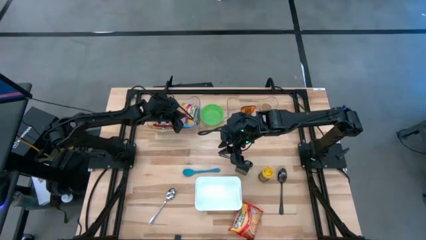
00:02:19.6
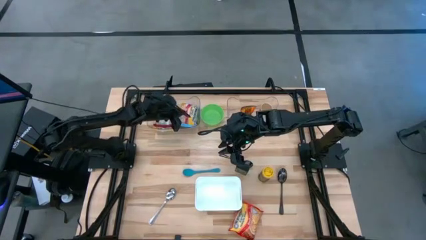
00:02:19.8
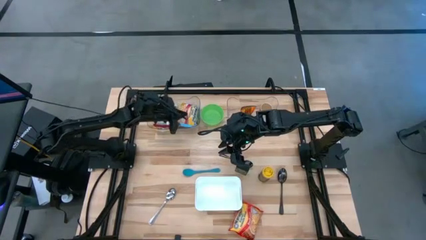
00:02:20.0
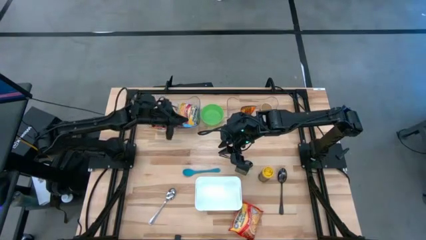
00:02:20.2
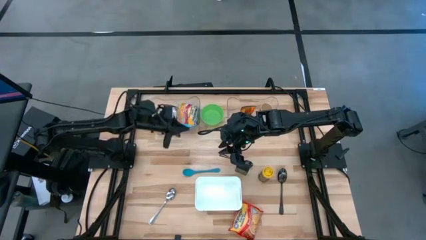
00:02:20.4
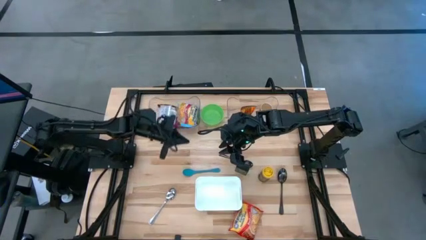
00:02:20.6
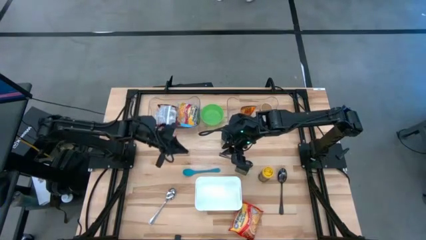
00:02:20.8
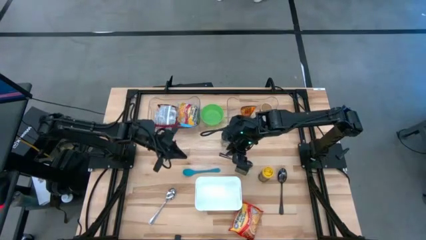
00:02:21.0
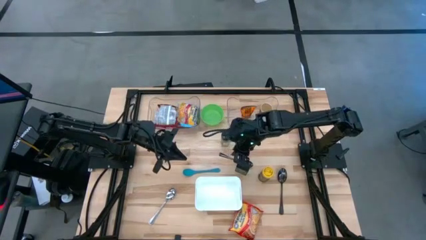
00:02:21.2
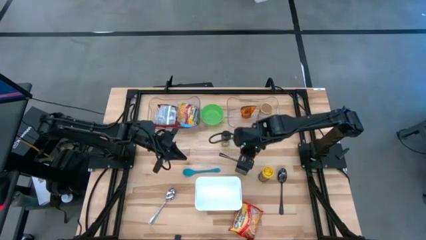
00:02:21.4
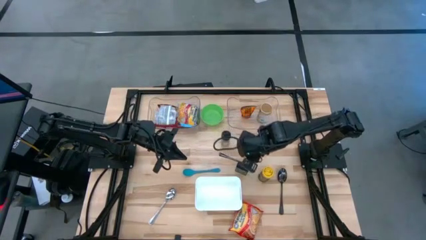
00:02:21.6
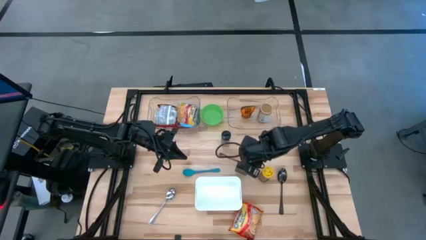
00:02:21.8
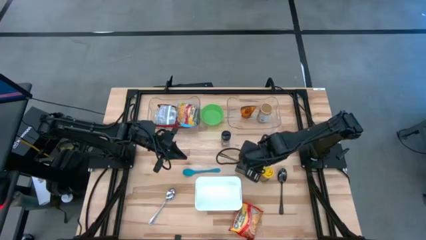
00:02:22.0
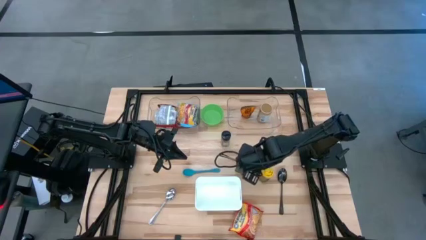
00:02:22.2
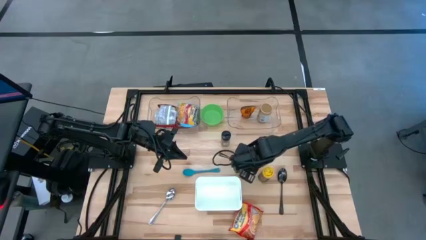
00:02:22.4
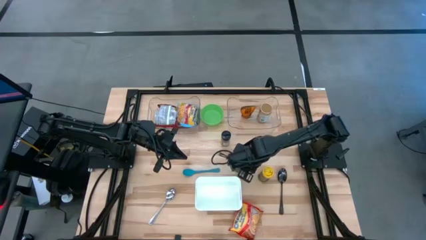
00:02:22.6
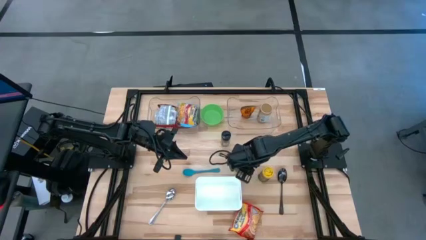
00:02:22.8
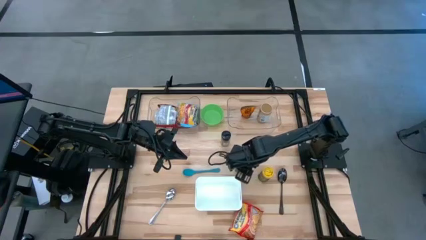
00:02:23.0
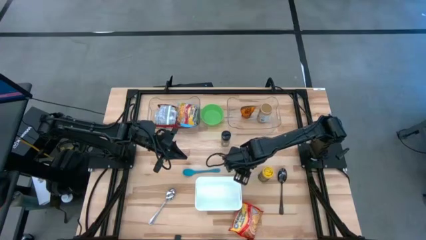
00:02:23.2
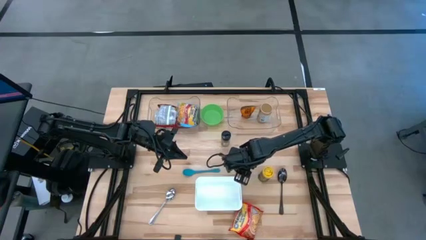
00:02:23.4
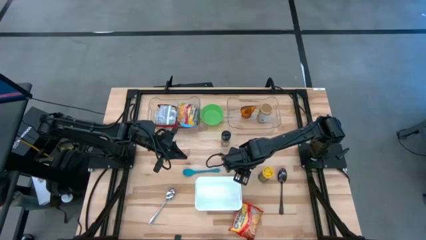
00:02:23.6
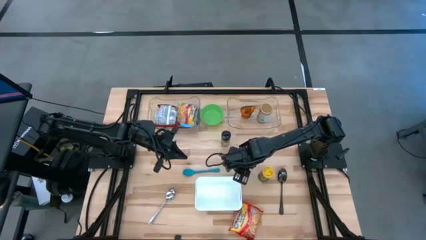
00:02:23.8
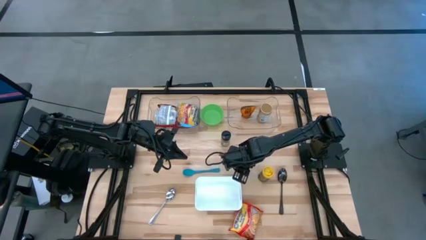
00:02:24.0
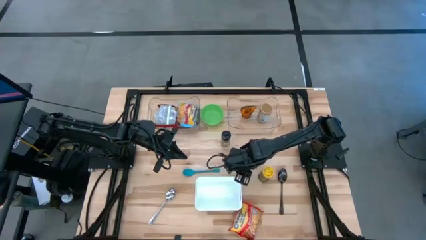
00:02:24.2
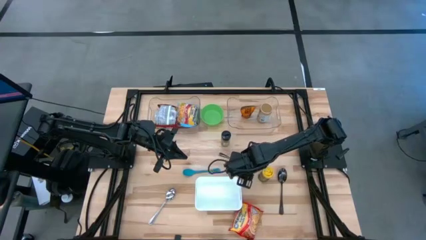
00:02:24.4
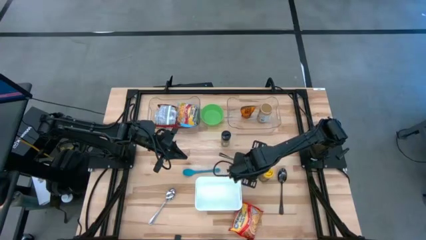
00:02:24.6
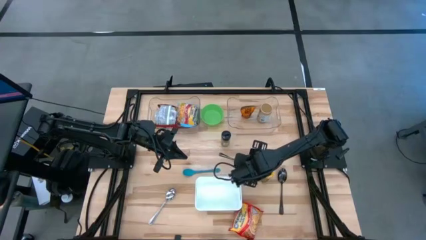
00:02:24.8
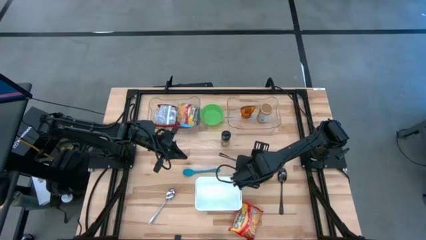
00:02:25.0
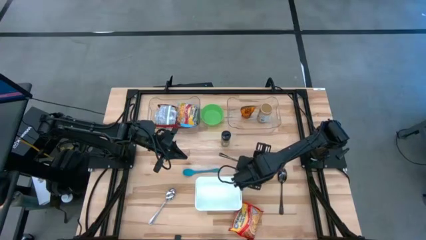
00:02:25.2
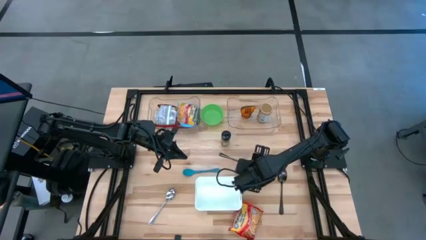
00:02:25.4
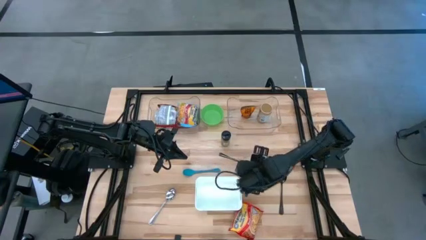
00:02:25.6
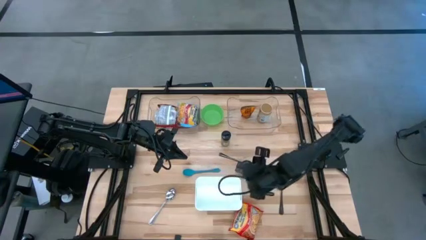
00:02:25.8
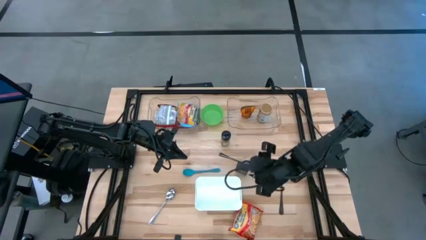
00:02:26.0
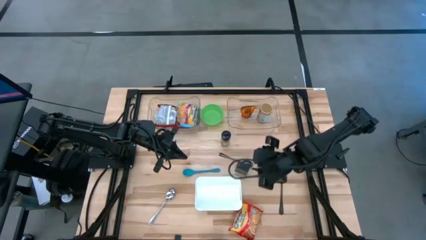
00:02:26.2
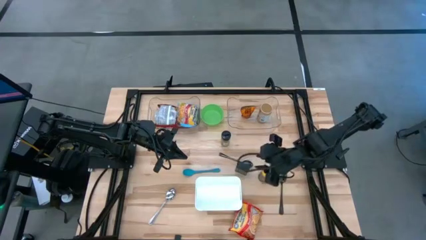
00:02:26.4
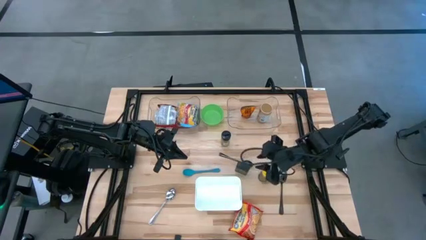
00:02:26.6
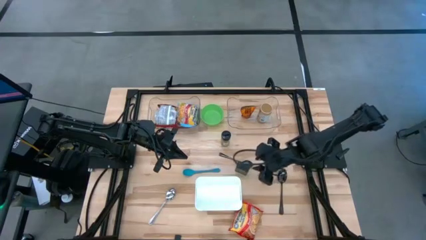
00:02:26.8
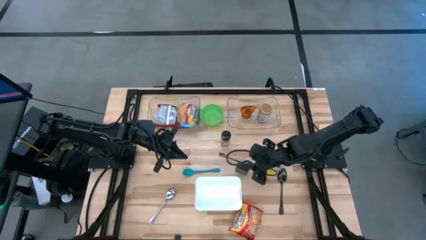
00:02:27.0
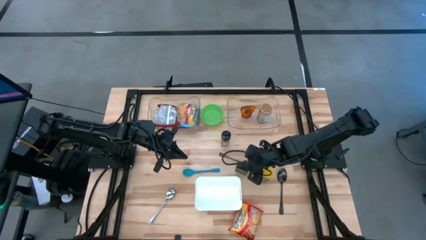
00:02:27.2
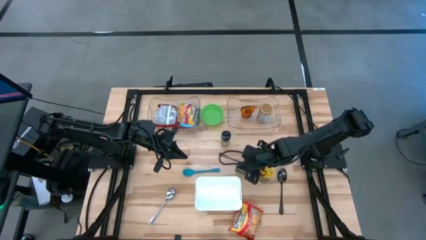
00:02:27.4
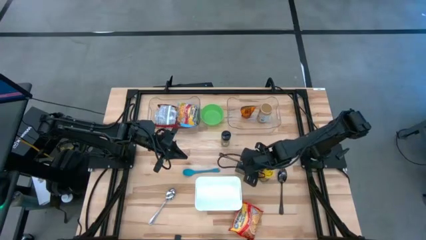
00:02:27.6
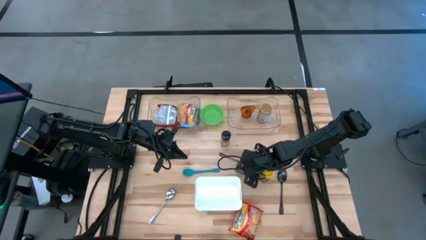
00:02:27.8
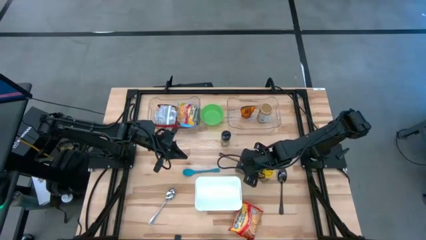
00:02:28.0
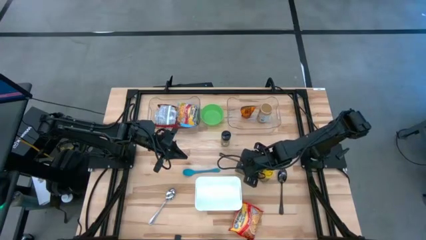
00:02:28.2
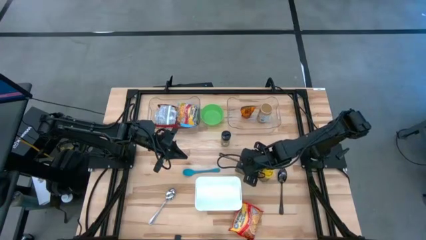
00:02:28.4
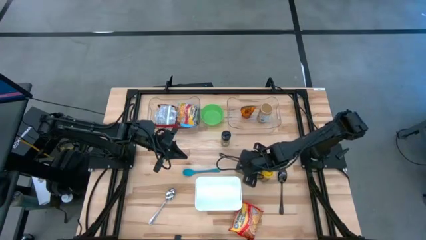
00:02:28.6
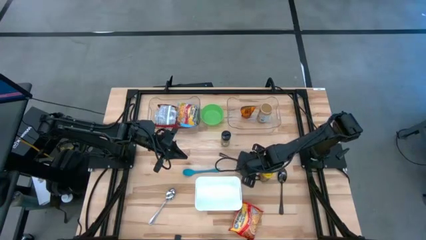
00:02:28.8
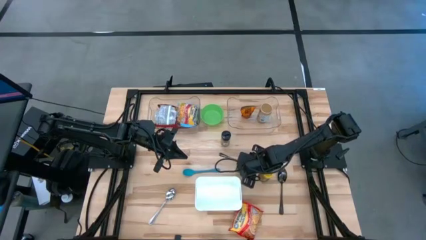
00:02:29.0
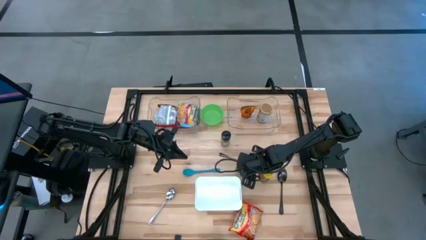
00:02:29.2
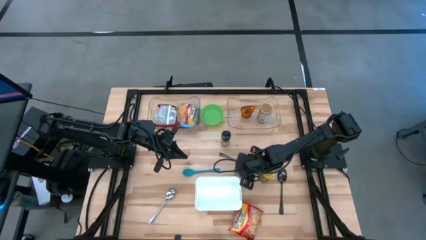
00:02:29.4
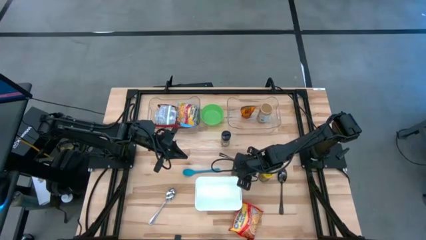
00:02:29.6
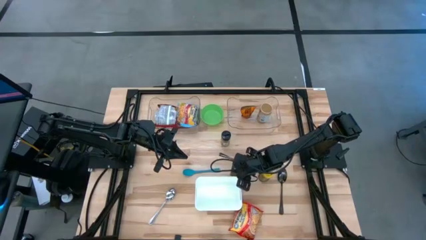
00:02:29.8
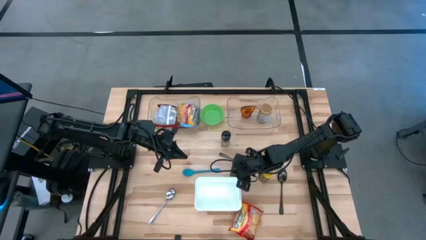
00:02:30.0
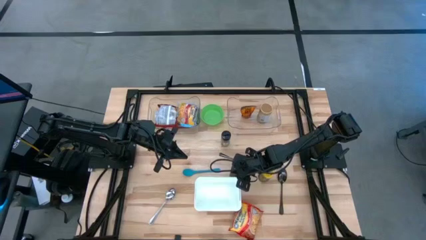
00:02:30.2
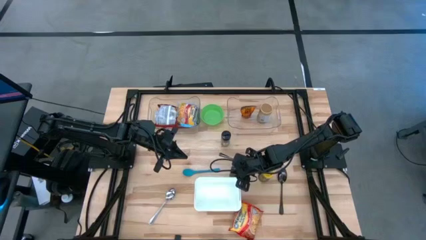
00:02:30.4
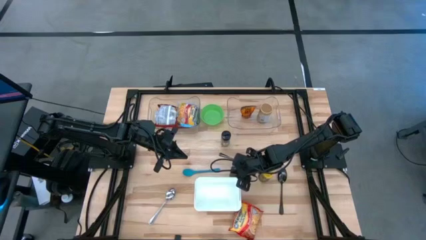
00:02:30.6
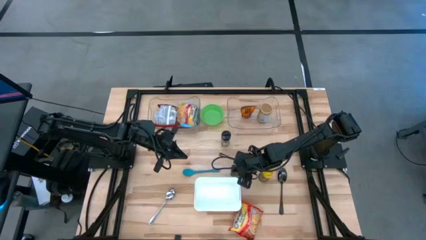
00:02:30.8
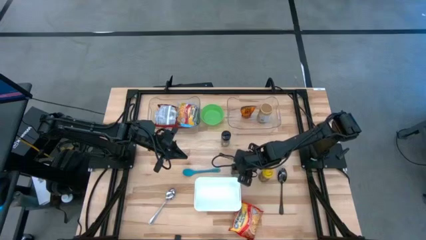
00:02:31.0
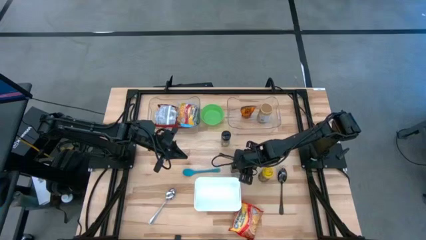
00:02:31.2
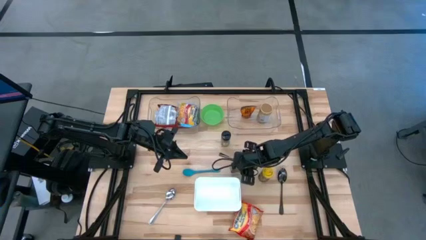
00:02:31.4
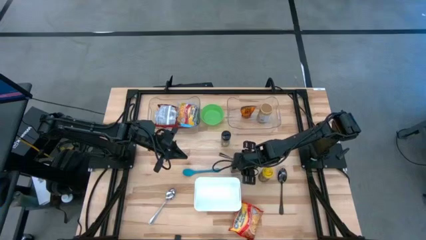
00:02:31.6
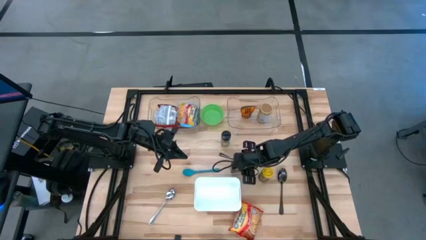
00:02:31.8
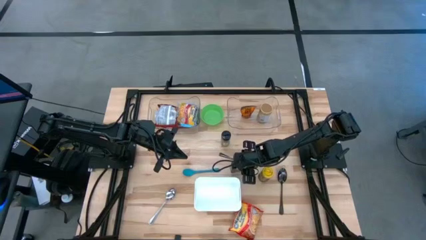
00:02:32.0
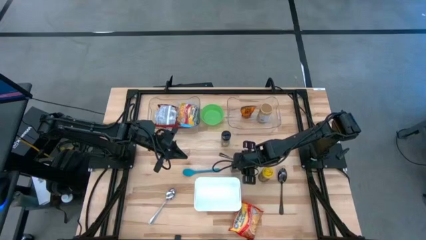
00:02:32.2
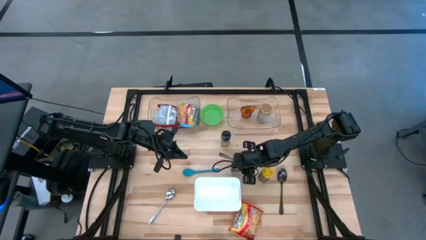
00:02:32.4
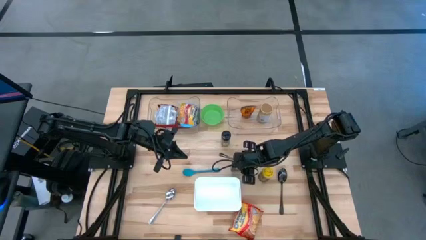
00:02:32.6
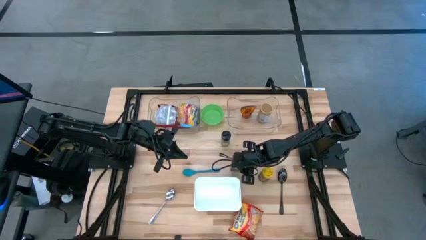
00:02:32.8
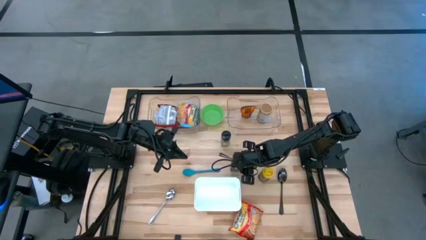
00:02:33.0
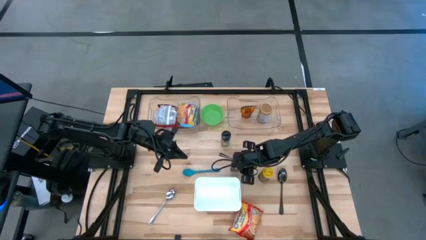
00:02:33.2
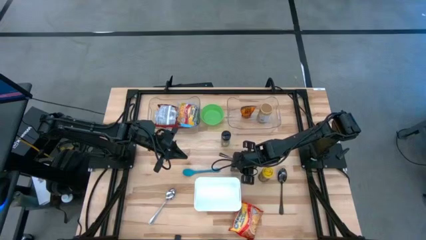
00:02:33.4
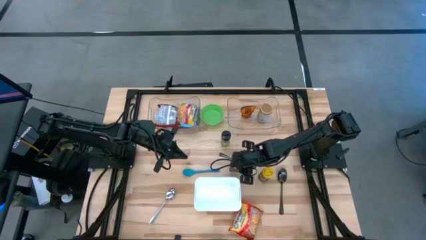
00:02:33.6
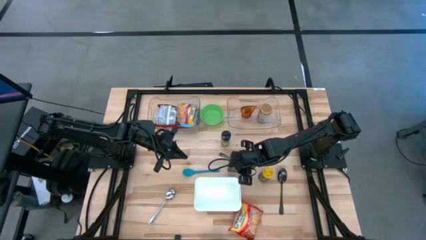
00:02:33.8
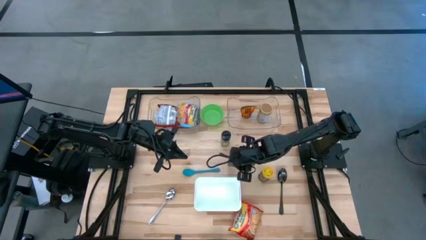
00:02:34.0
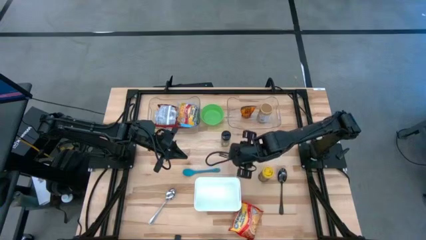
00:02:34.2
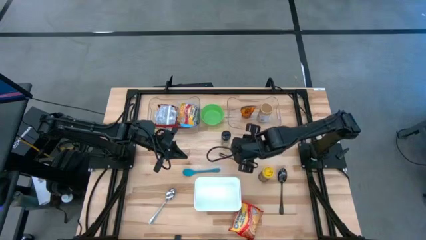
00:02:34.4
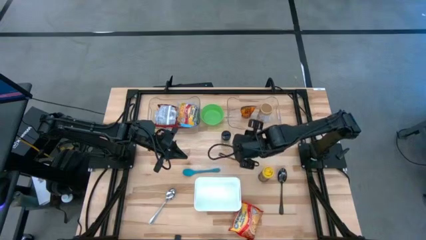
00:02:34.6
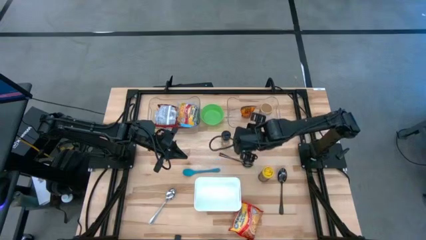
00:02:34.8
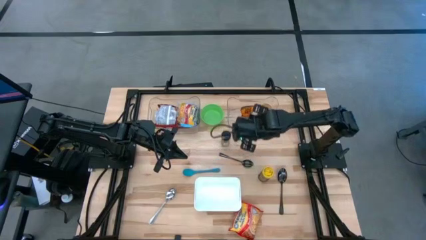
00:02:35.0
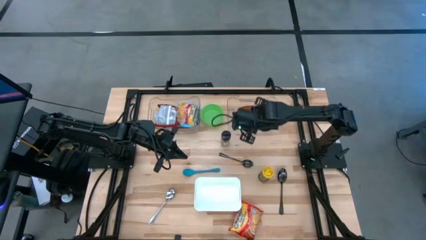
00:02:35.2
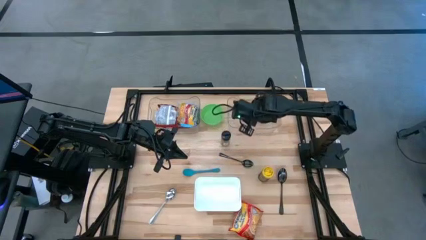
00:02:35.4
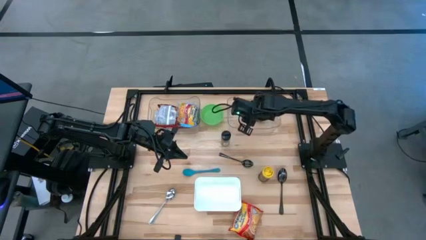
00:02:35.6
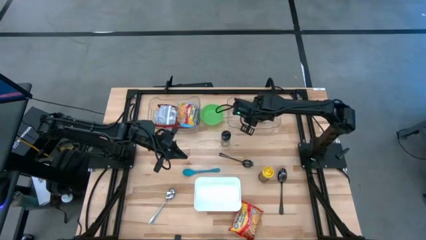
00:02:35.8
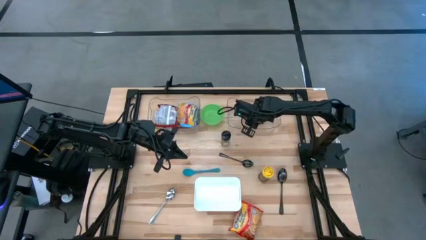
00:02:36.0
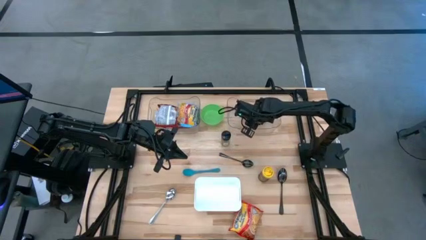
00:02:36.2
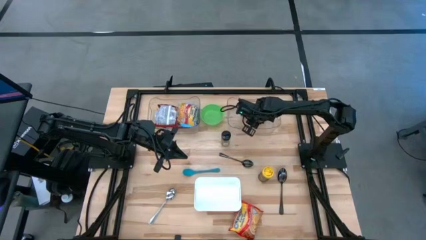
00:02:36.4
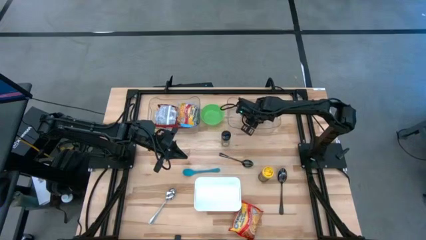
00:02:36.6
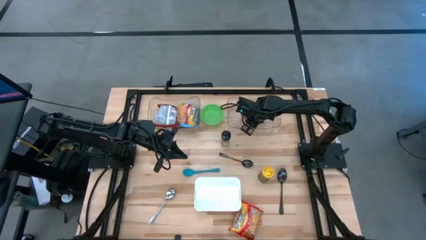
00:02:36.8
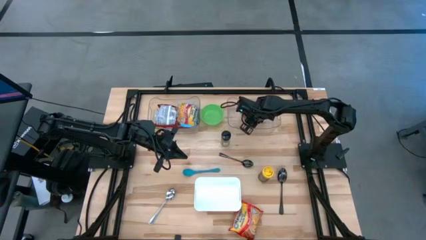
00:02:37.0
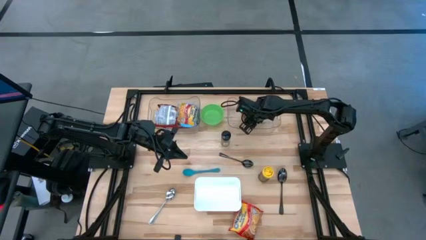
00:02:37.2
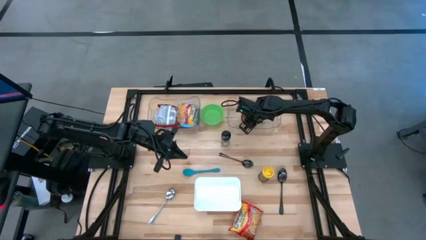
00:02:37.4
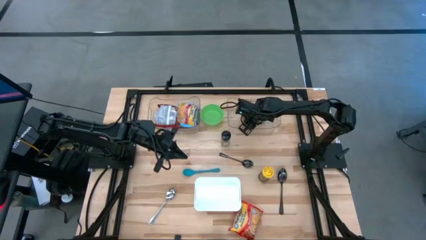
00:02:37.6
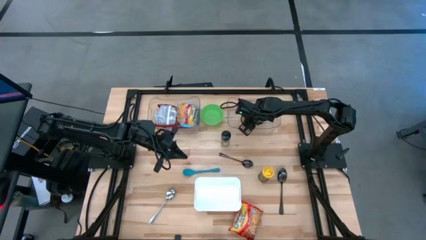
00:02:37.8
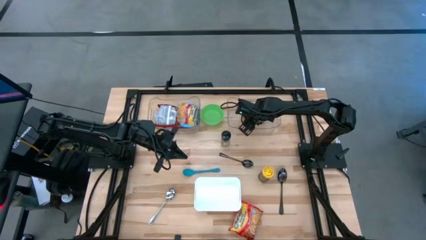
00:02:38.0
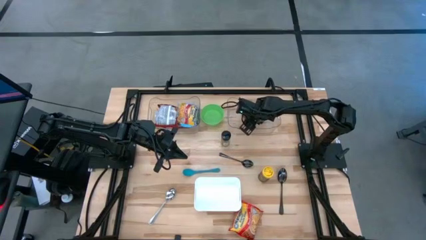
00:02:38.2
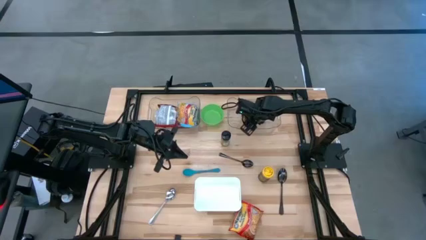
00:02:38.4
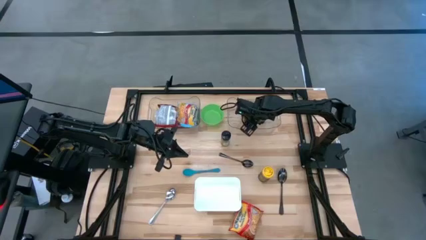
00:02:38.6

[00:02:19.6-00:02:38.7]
Task: Pick & Place Food Item
Put the black seasoning into the right transparent bin
